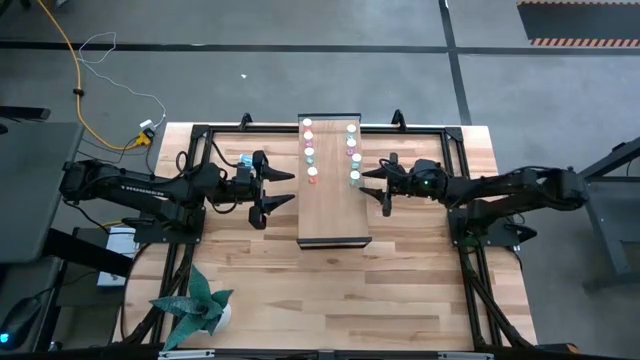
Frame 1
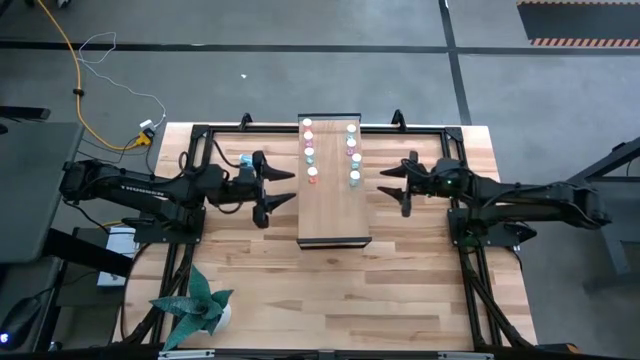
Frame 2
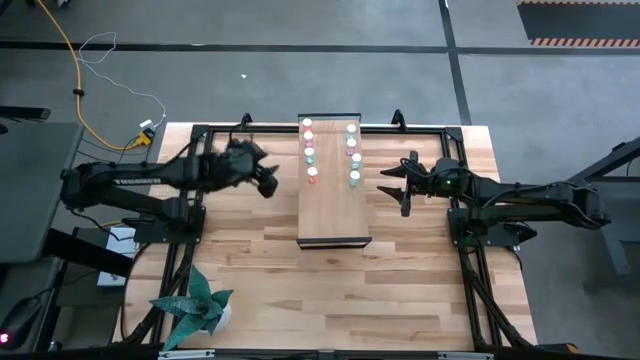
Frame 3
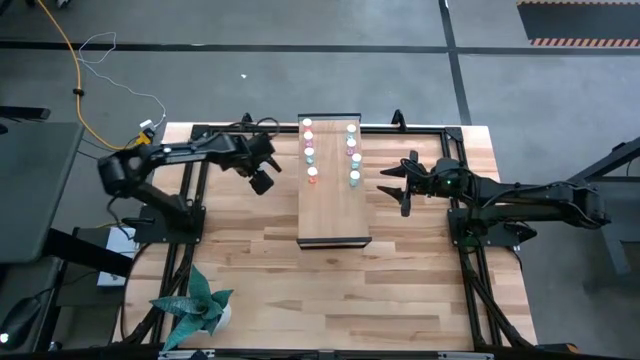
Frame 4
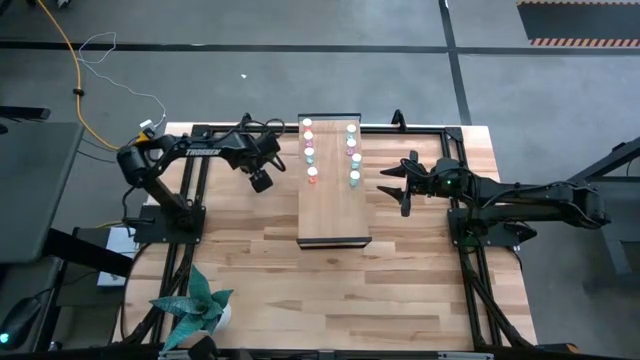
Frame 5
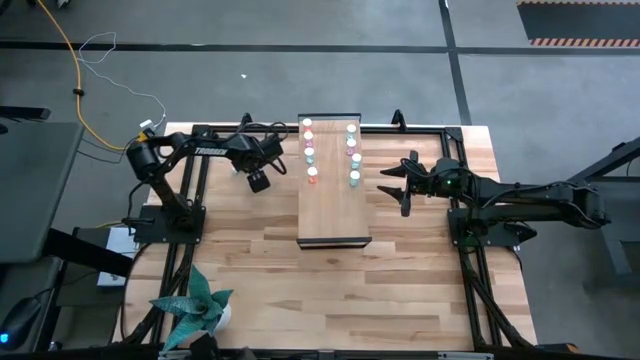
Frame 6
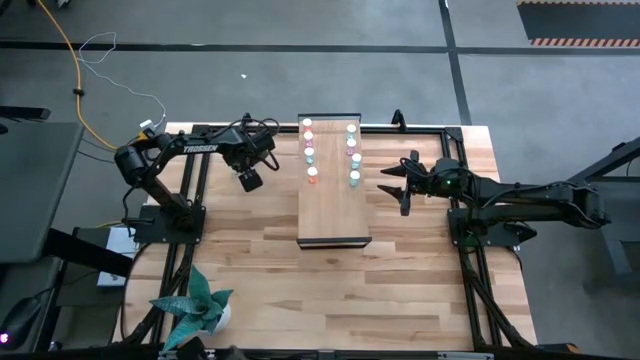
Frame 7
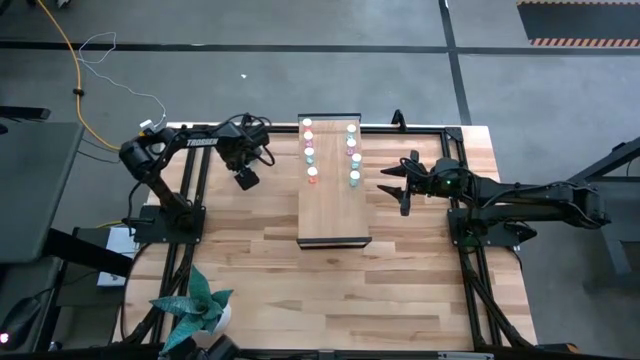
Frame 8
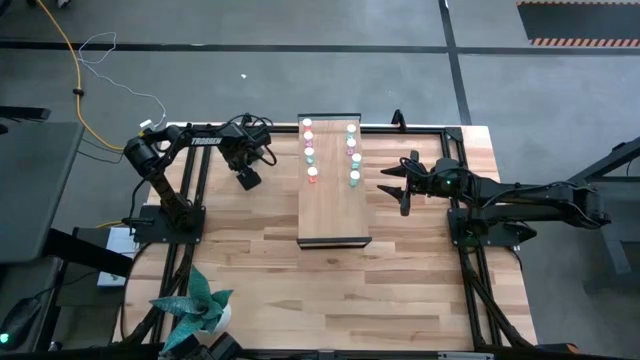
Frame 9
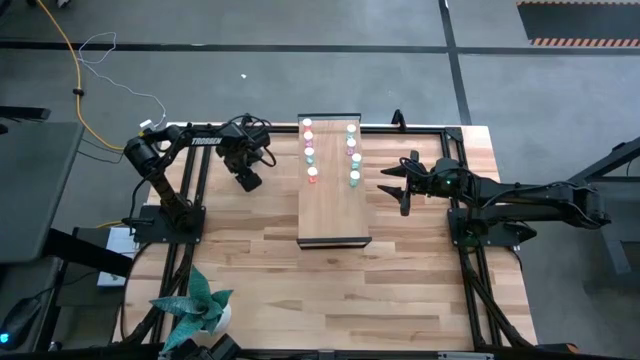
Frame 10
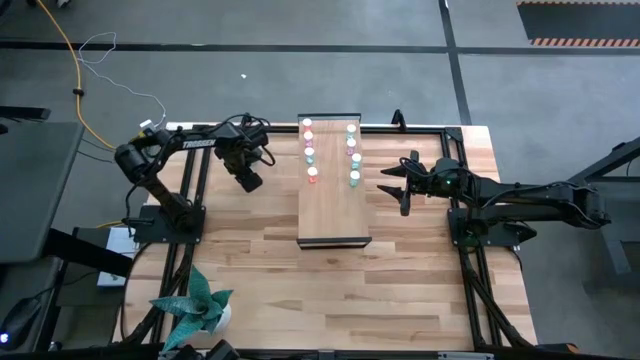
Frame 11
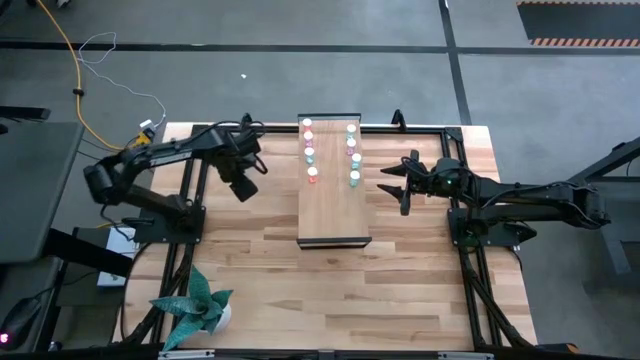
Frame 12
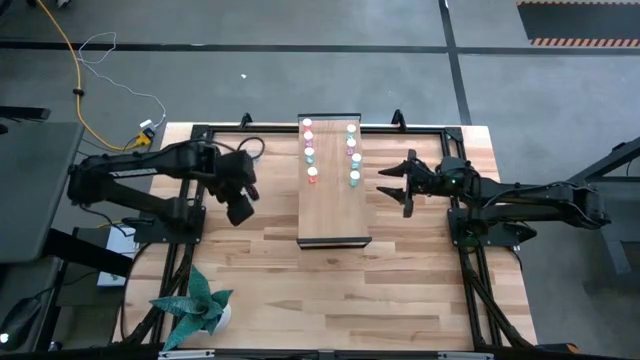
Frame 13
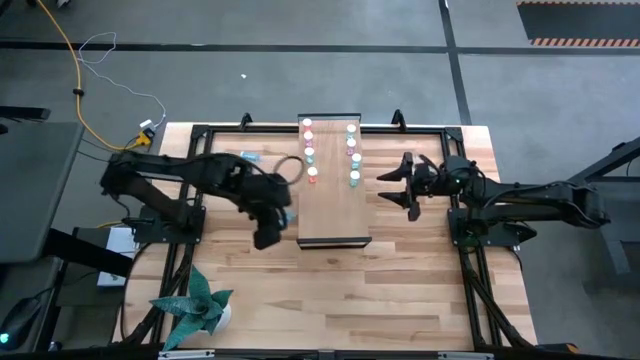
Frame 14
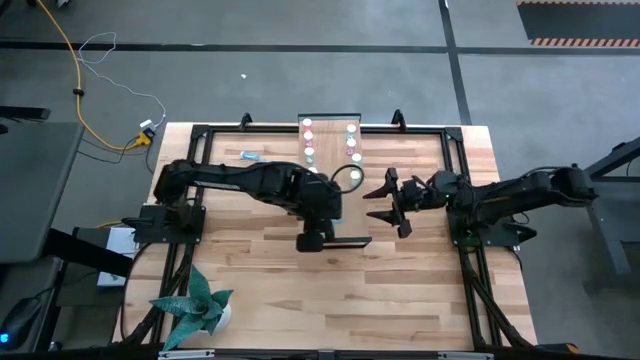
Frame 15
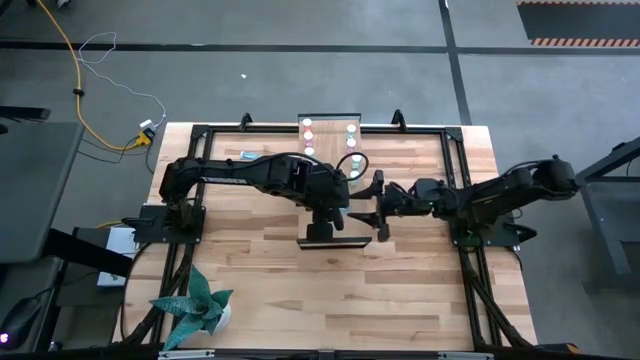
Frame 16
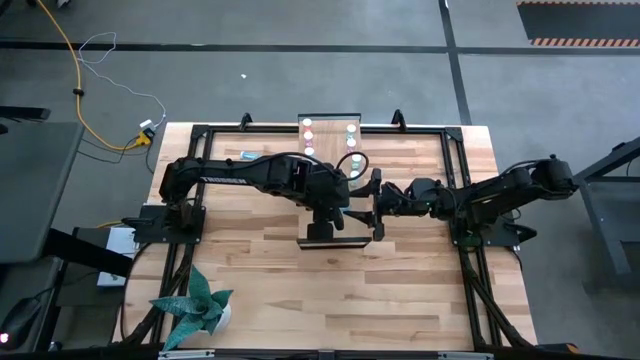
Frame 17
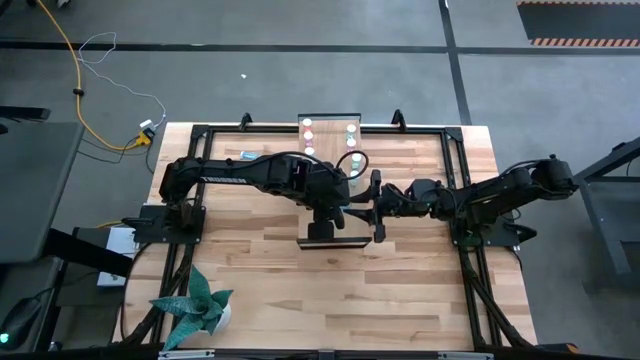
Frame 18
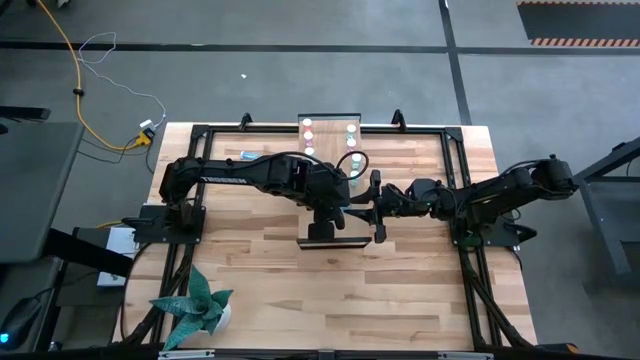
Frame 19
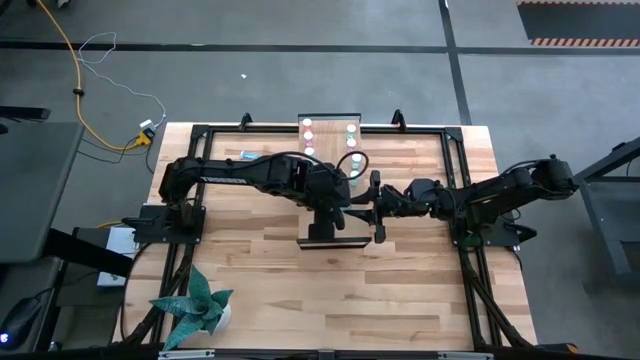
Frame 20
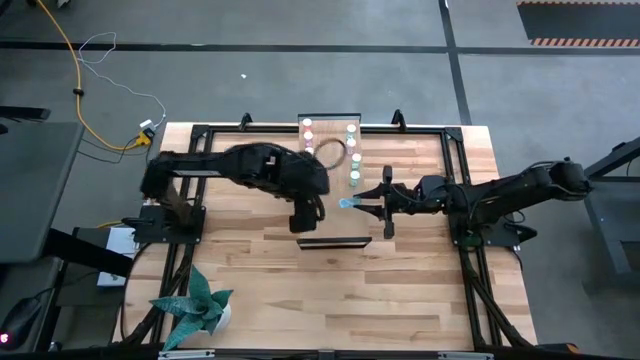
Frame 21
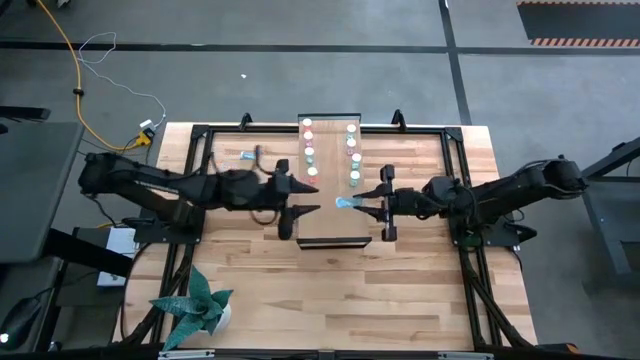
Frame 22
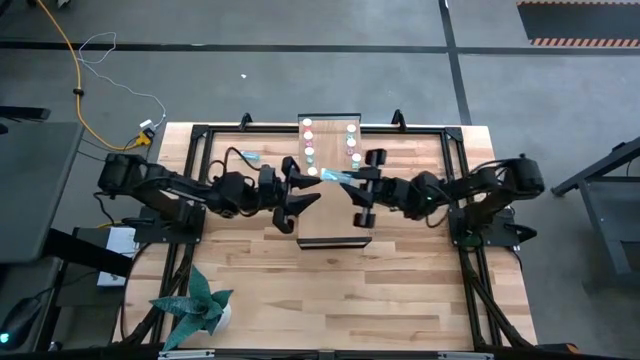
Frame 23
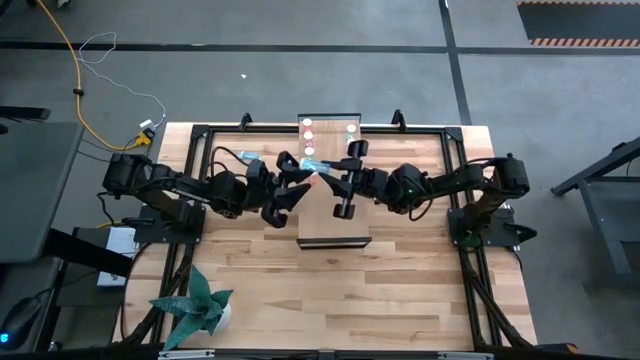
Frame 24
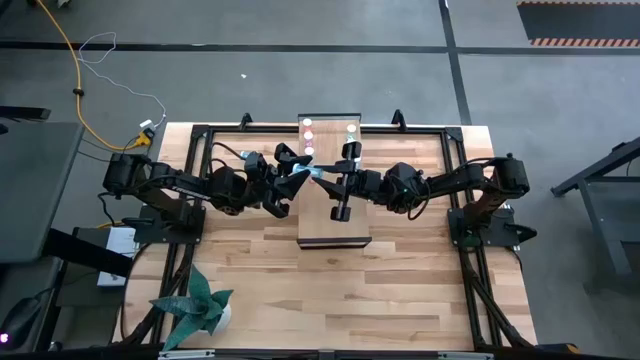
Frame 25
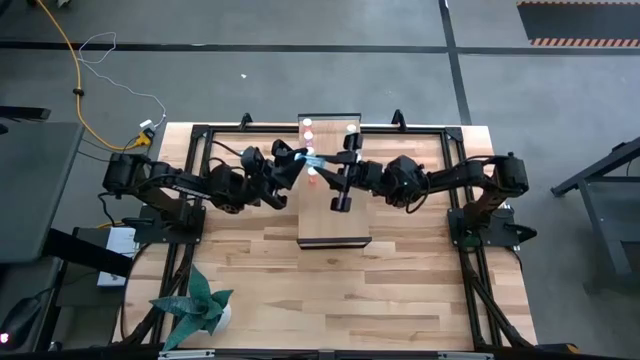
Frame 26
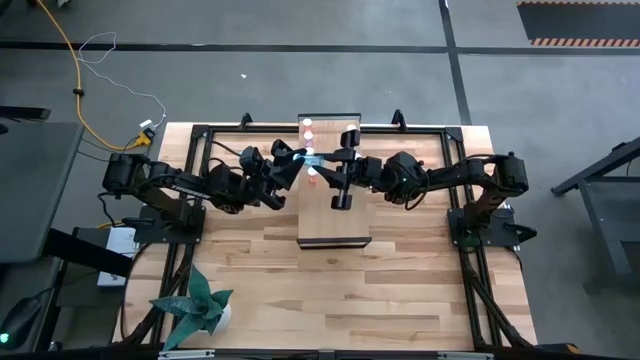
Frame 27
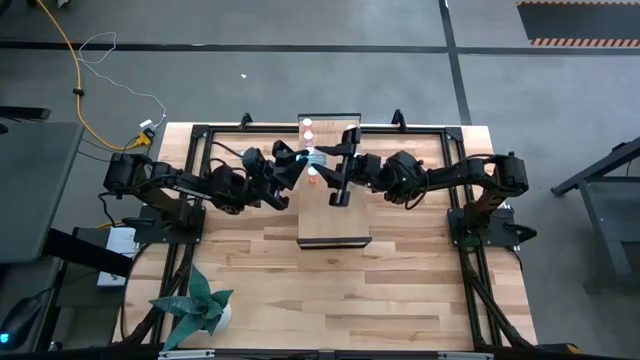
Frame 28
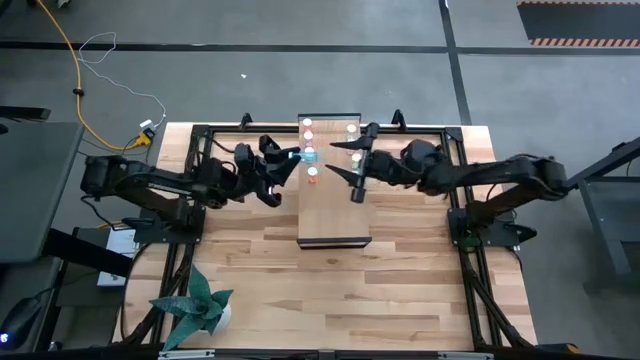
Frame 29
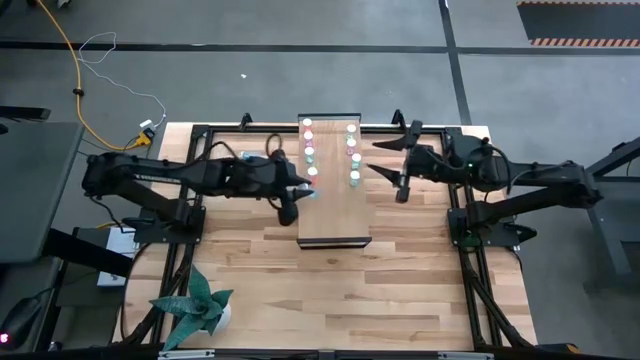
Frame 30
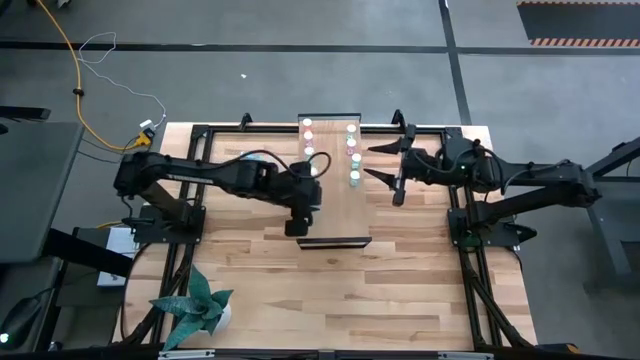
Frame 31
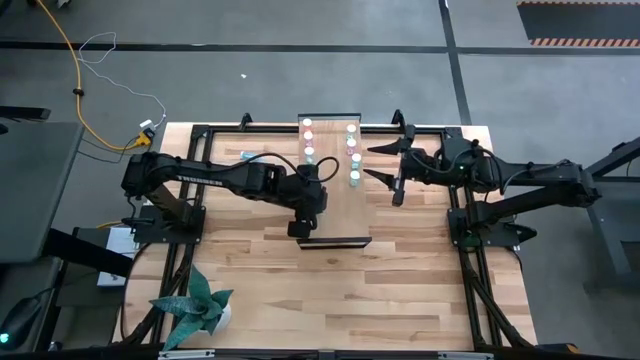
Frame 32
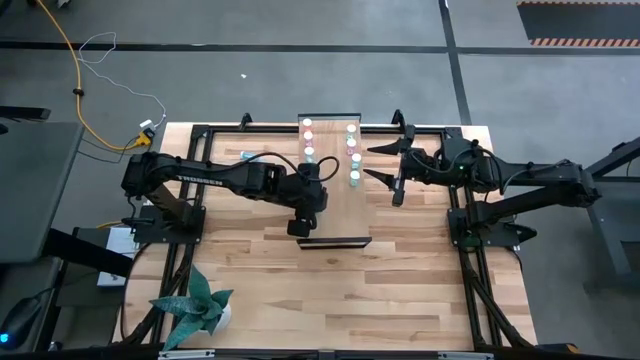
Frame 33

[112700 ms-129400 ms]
Task: Pick and place medicine bottles onto shelf by color
Put the transparent blue pill bottle on the shelf

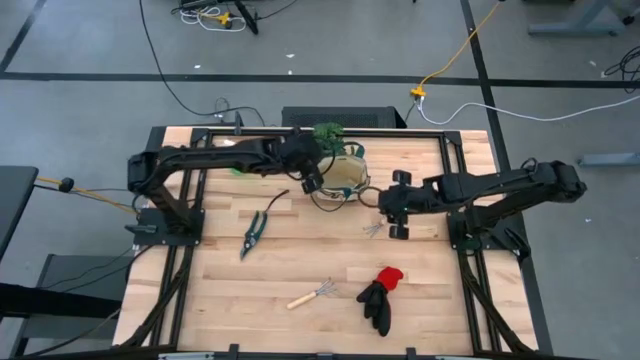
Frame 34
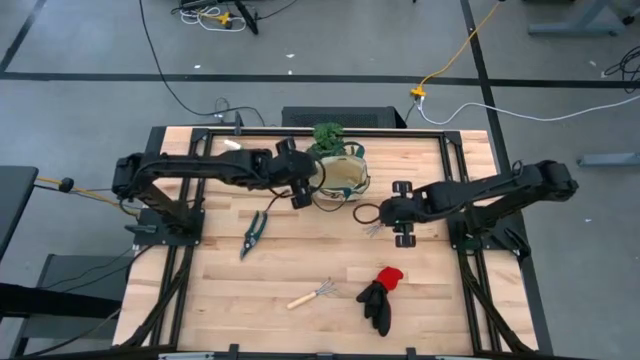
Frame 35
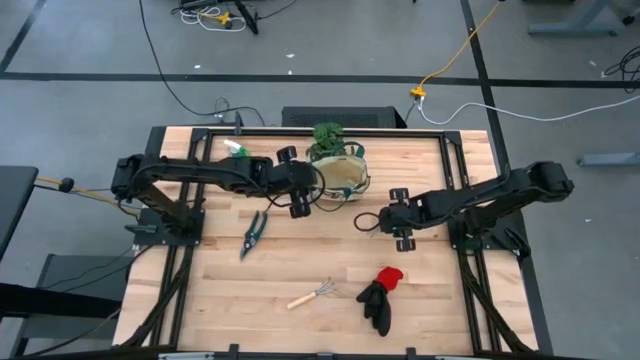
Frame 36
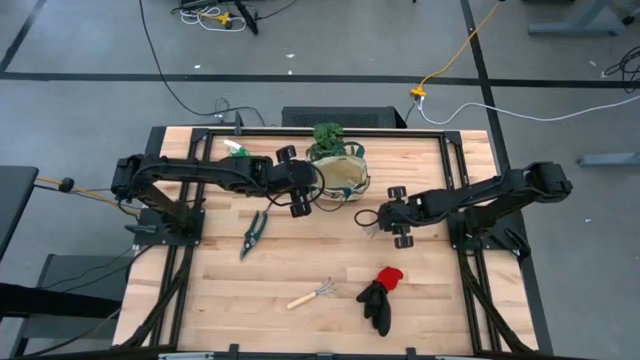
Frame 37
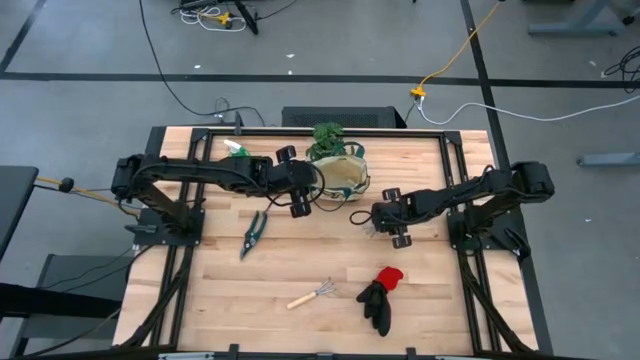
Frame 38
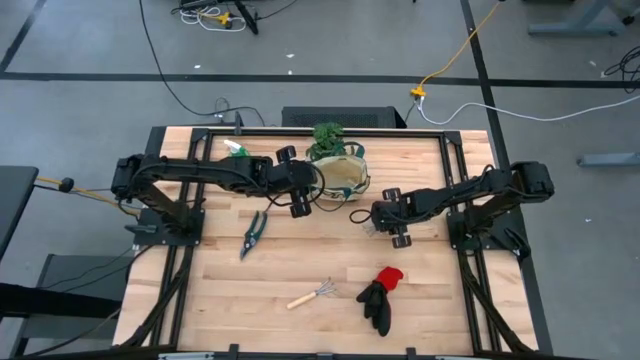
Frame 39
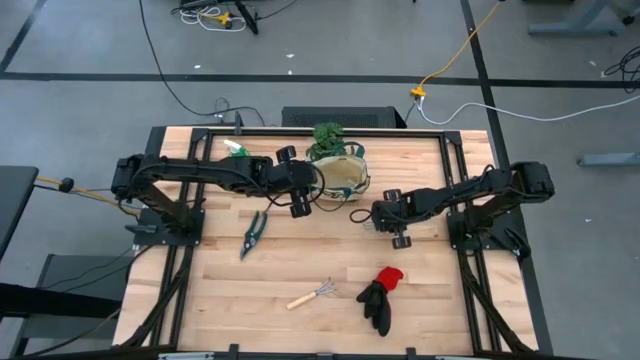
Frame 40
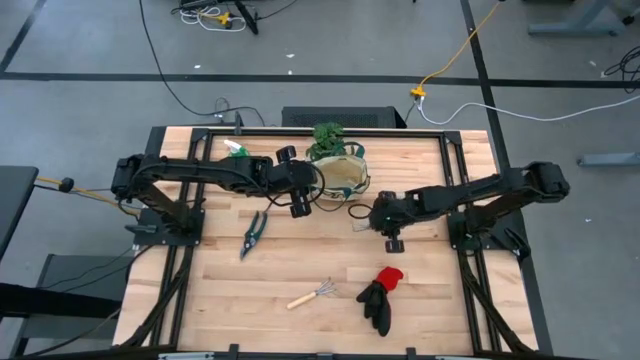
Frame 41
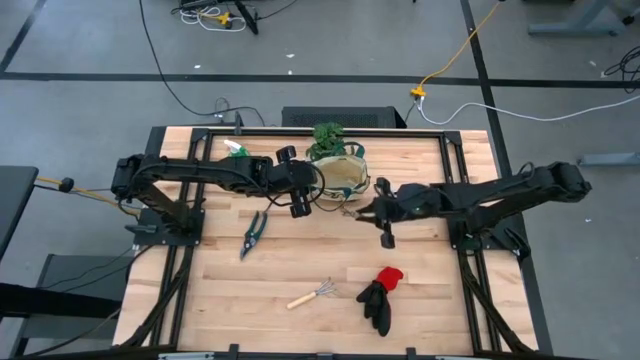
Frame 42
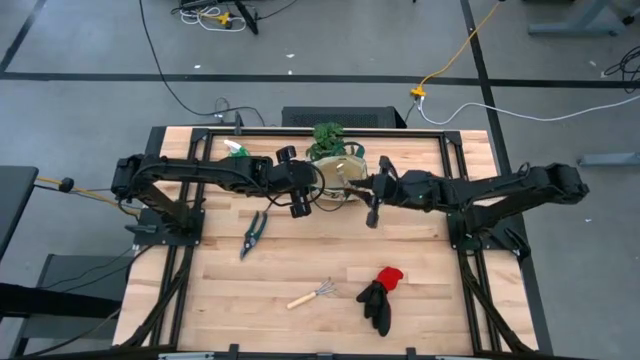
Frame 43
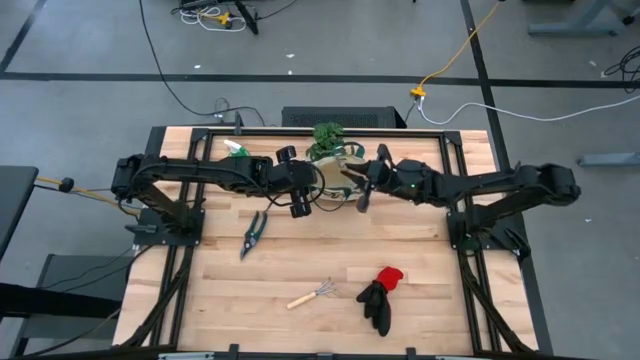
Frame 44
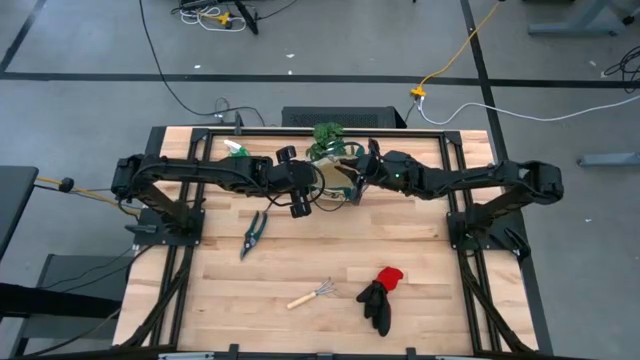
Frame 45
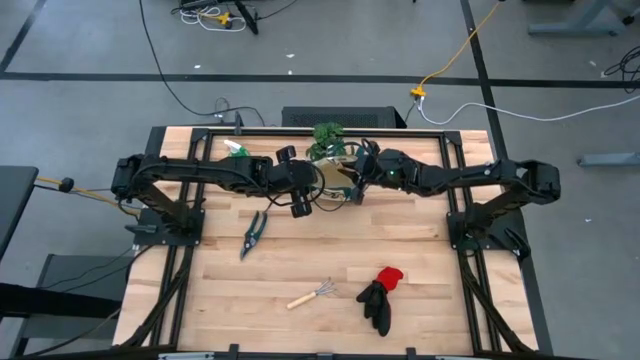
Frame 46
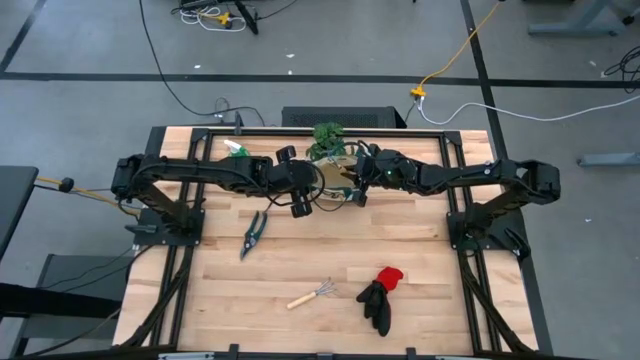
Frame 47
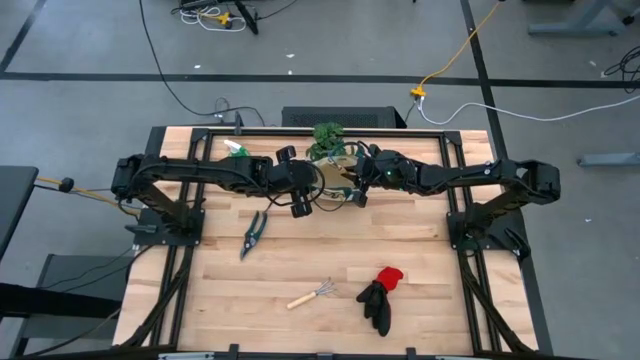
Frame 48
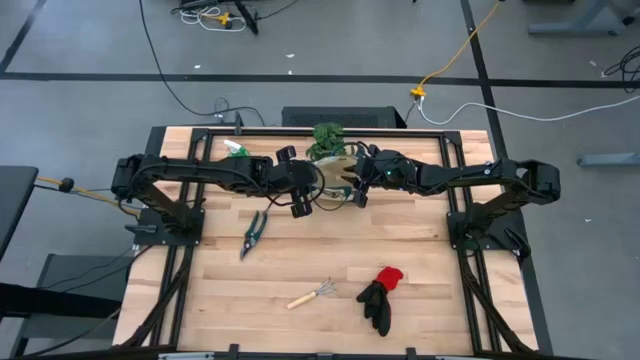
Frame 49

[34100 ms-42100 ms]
Task: Pick & Place Garden tools in Gardening bag
Put the top brown hand rake into the green gardening bag
